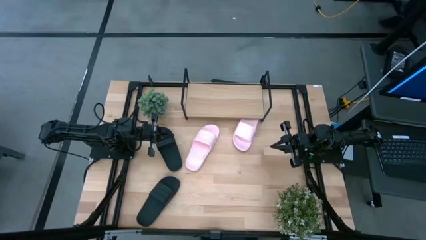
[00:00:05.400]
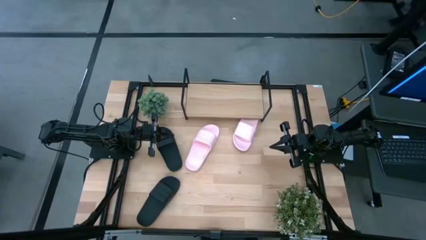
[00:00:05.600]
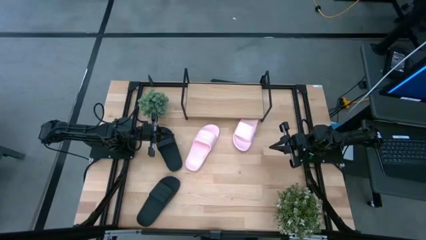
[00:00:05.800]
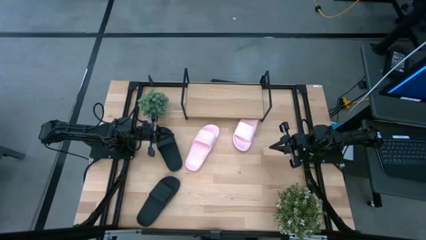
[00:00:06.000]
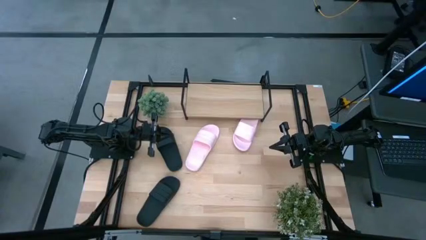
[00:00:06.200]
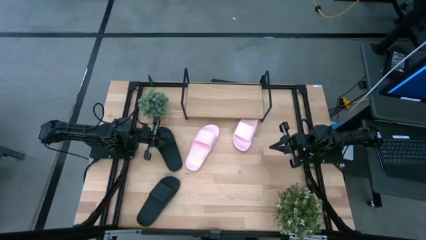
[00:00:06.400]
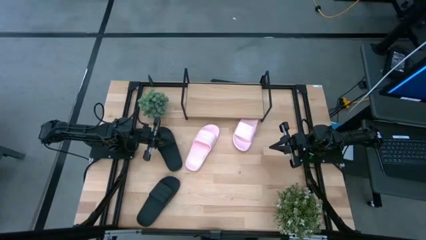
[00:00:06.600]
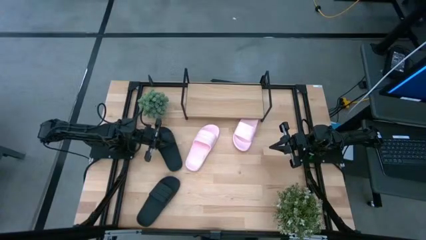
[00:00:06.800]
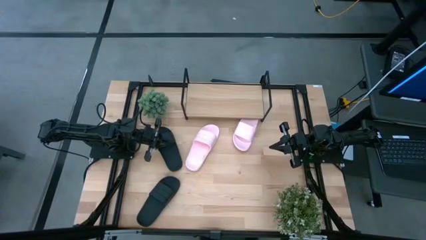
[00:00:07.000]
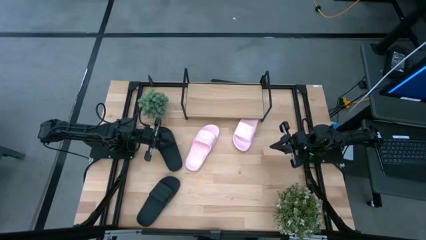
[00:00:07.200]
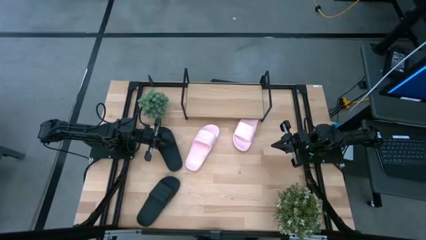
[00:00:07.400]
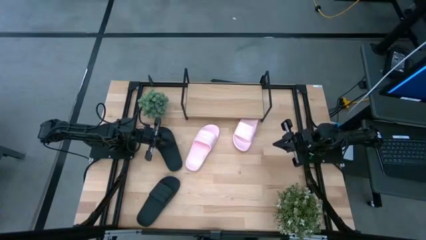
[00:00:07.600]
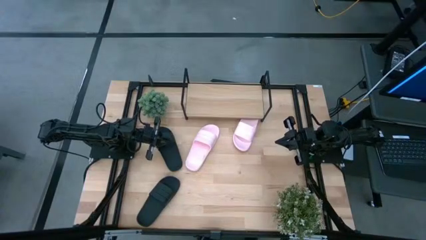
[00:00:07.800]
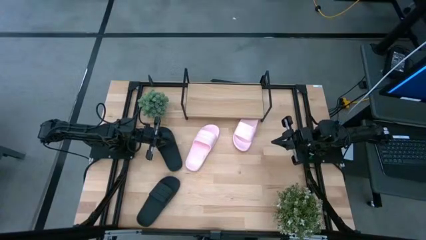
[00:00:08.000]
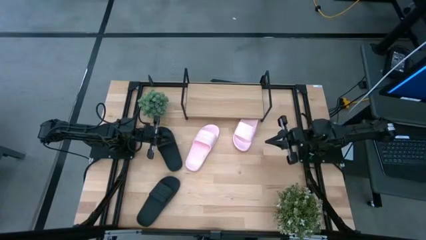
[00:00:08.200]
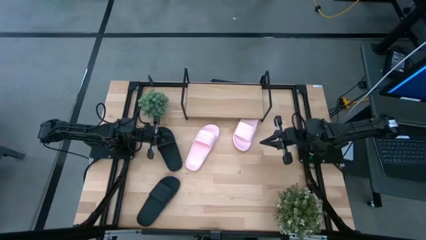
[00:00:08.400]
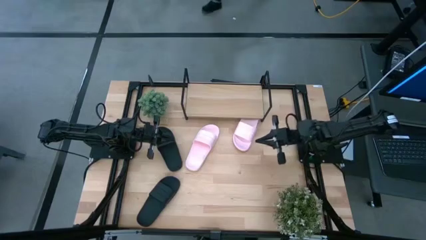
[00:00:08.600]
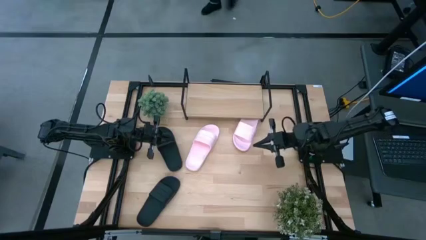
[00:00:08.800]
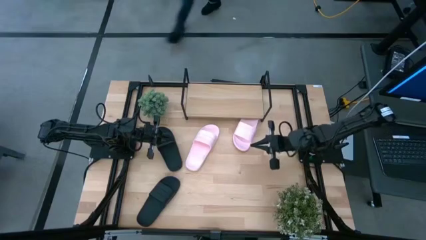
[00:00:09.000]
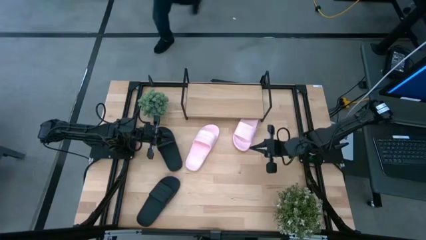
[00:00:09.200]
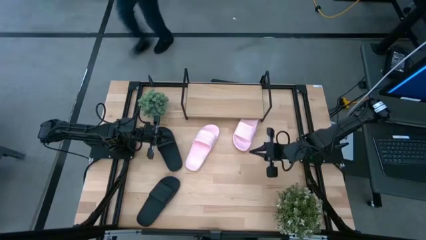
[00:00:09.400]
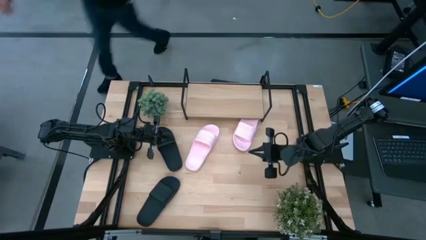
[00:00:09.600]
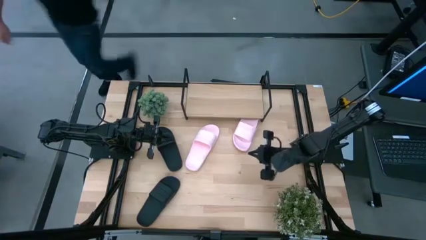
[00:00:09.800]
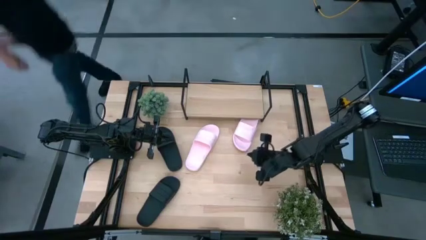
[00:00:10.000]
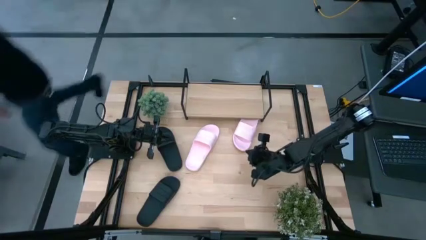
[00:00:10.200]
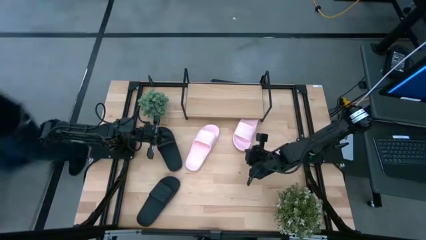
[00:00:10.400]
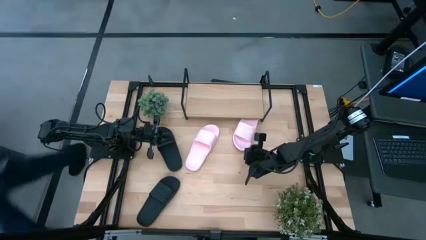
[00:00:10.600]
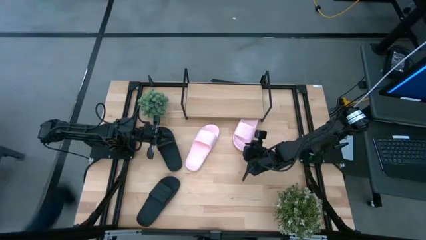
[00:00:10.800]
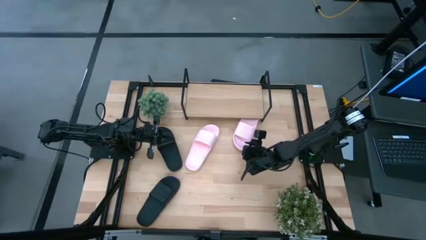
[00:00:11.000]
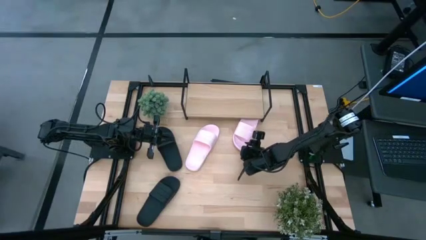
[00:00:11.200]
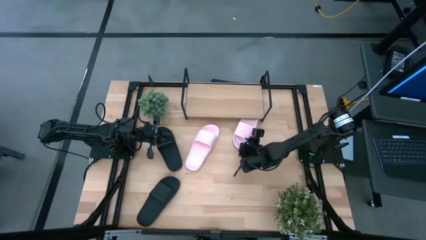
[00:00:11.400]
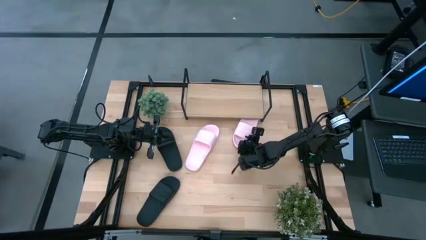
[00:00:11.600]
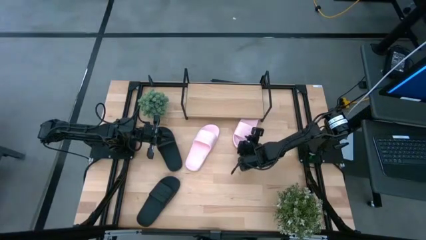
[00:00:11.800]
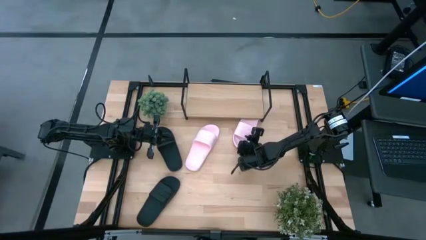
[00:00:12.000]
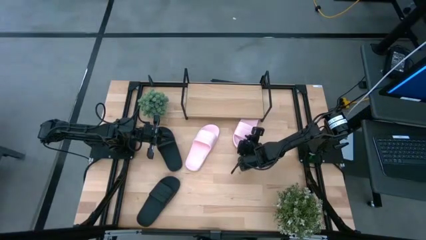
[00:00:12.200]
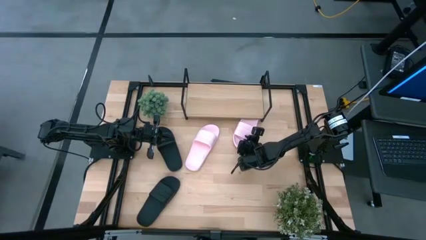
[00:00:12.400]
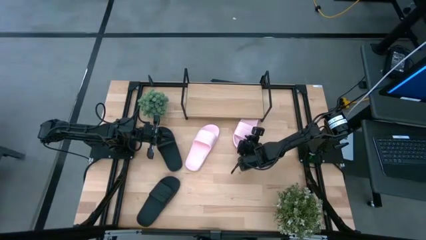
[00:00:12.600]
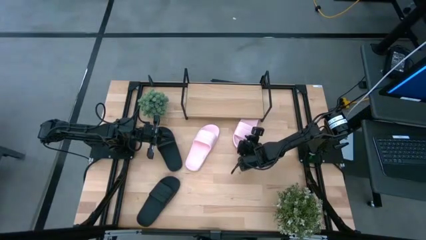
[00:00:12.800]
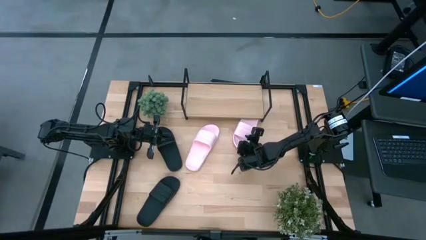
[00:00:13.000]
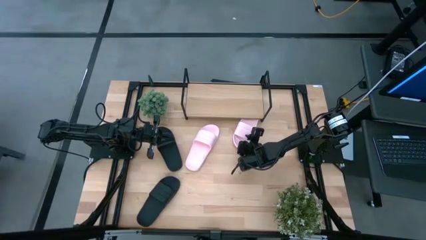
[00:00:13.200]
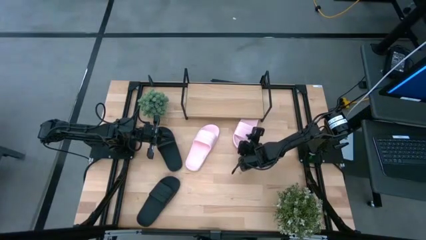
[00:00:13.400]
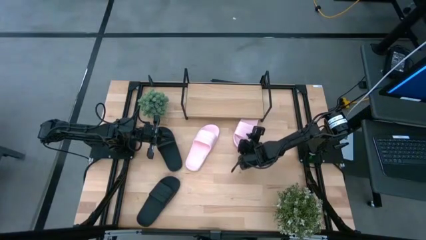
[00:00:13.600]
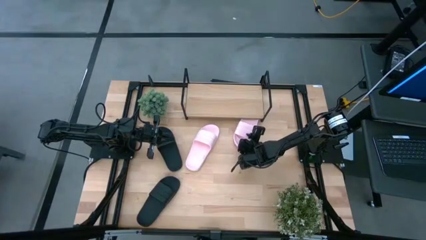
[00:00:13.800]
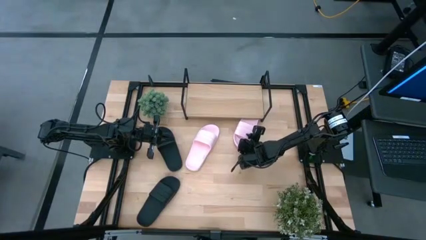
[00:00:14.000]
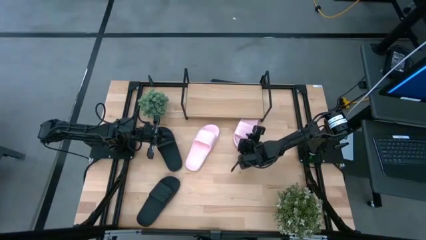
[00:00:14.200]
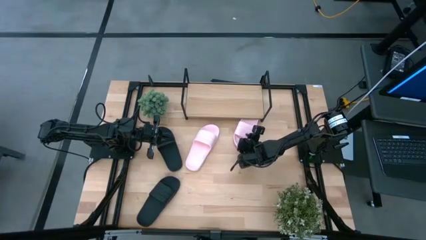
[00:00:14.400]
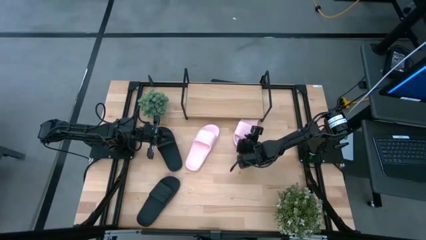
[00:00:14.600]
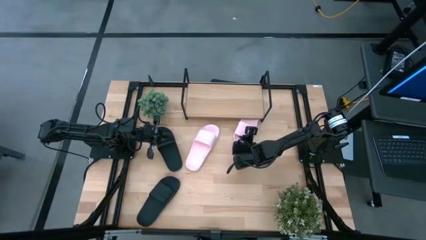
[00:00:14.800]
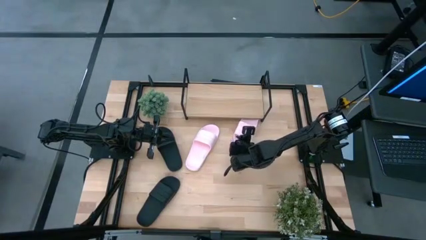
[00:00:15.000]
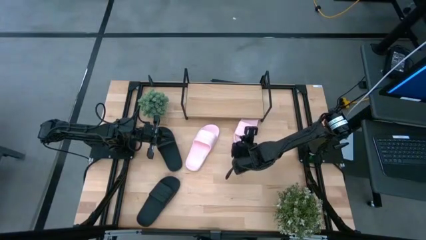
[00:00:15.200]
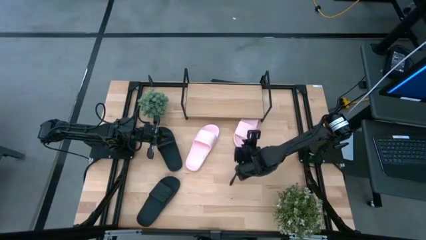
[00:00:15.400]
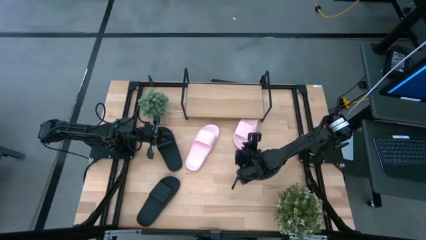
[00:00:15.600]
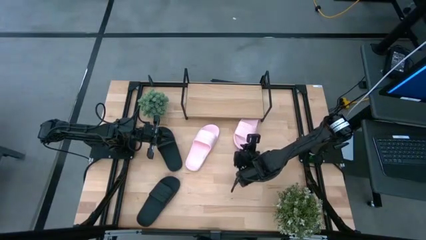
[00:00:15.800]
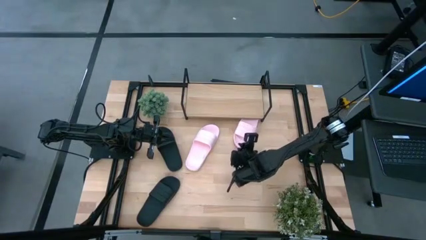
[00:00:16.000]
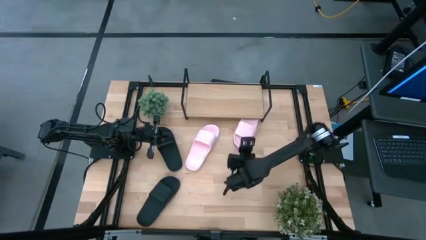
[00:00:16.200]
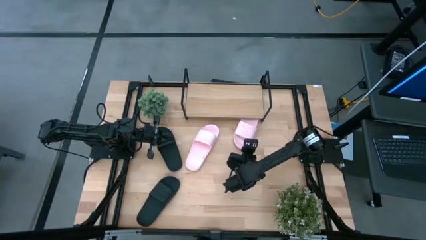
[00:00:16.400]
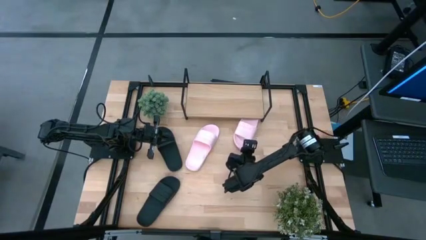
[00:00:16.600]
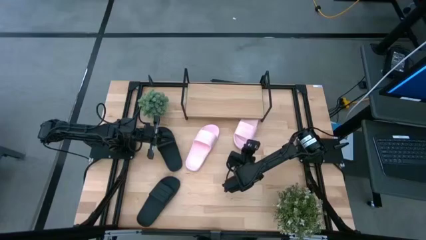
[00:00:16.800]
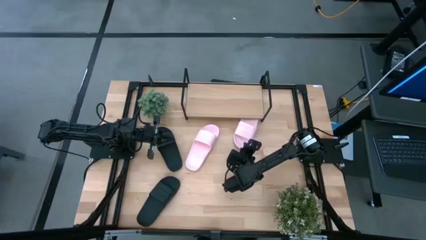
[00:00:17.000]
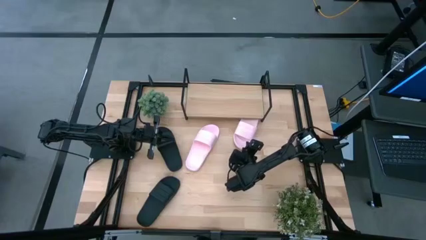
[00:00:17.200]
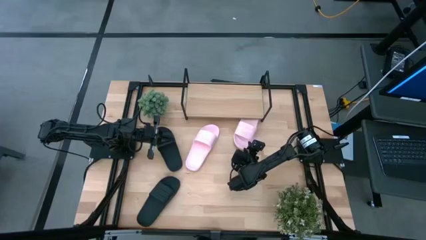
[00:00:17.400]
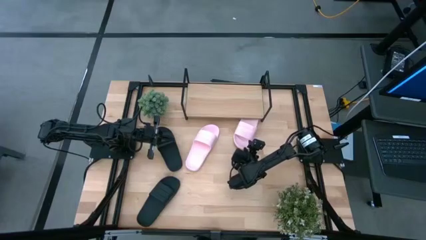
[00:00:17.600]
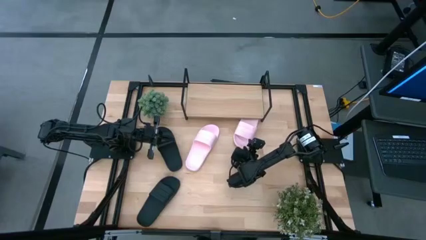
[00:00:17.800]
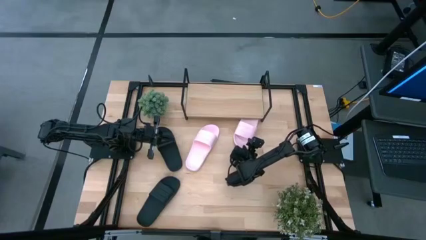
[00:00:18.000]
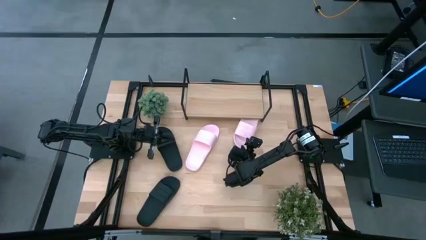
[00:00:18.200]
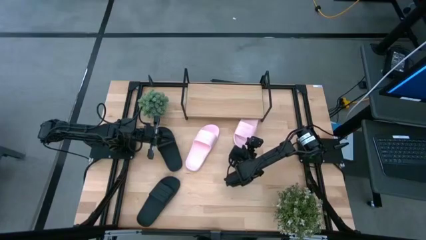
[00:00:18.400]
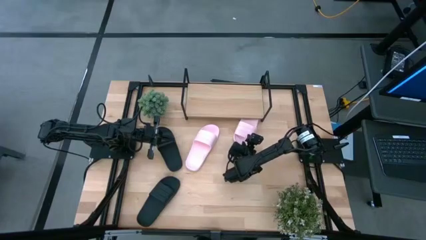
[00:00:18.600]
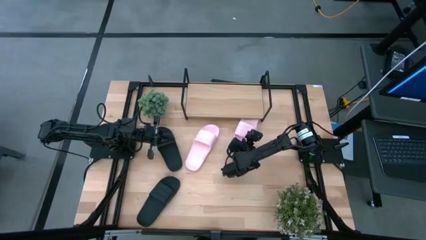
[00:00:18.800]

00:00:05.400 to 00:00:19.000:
Task: Pick and place slides into the shelf
Put the right pink slides on the shelf
